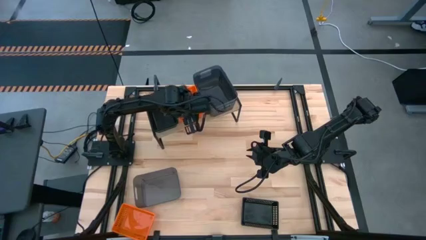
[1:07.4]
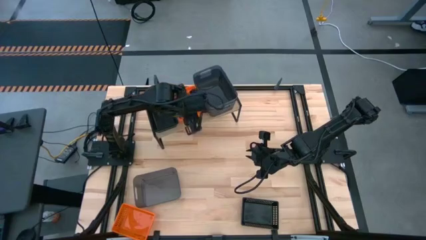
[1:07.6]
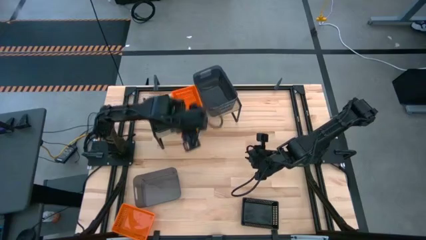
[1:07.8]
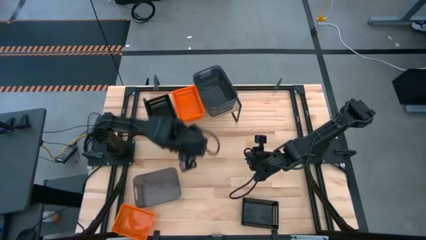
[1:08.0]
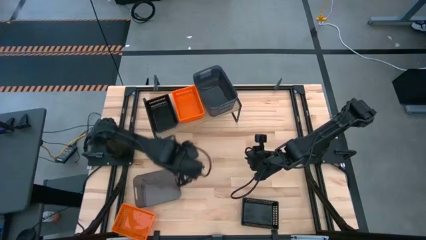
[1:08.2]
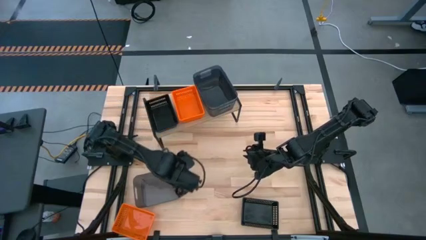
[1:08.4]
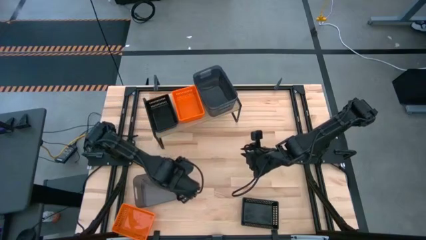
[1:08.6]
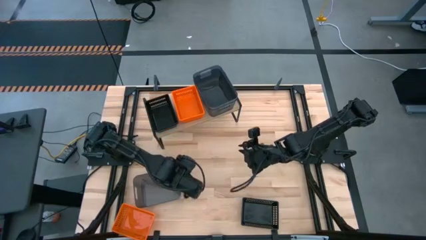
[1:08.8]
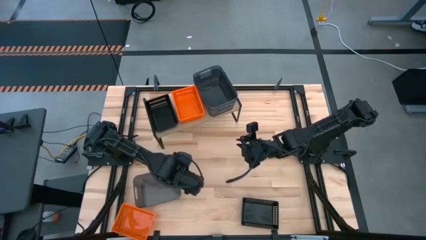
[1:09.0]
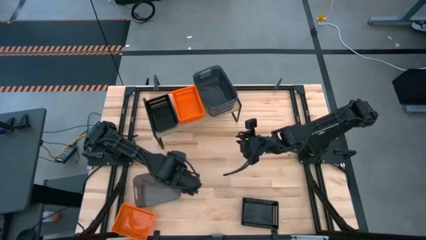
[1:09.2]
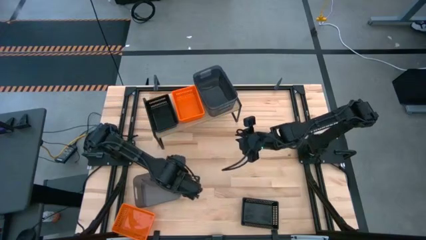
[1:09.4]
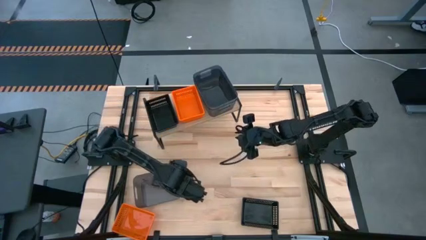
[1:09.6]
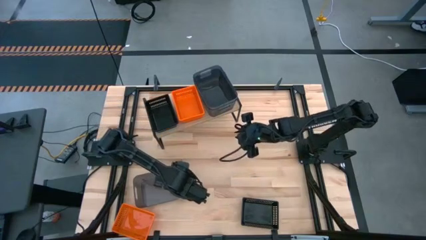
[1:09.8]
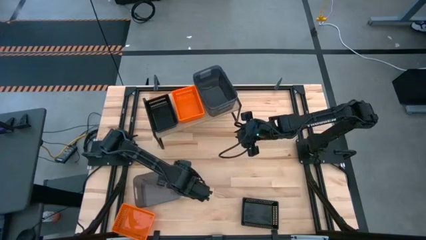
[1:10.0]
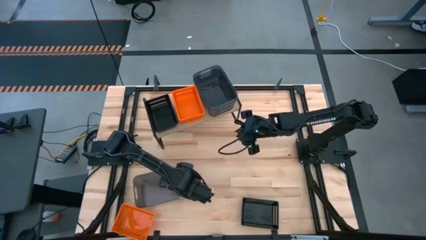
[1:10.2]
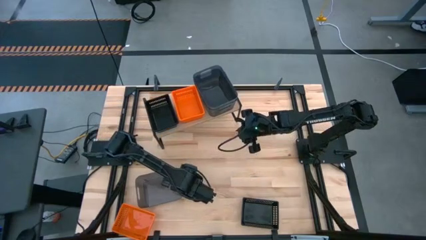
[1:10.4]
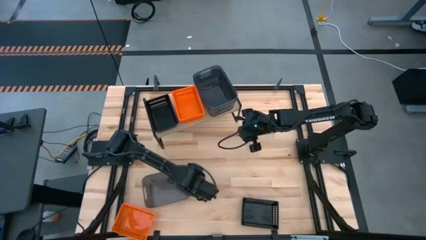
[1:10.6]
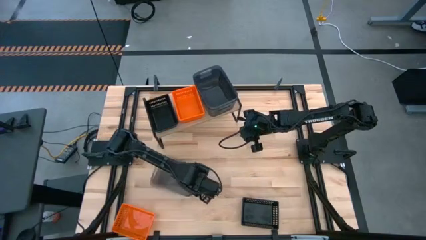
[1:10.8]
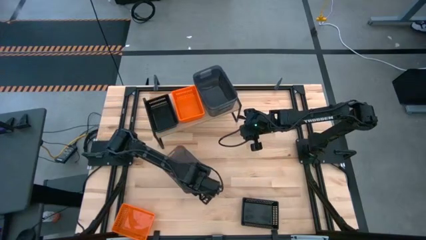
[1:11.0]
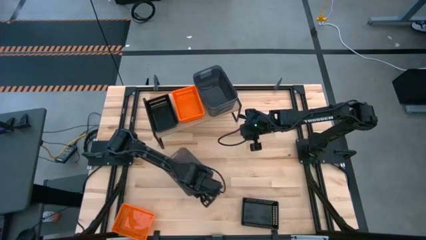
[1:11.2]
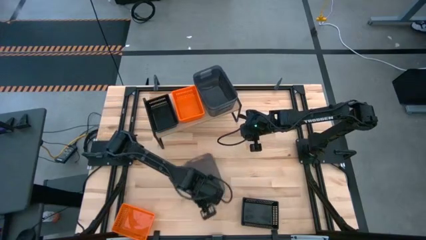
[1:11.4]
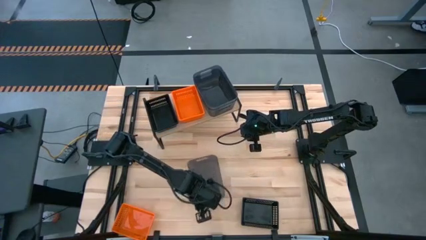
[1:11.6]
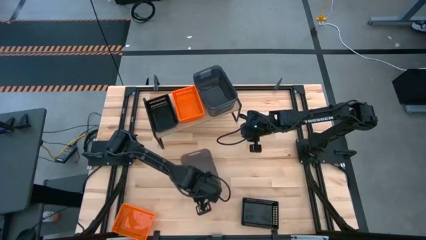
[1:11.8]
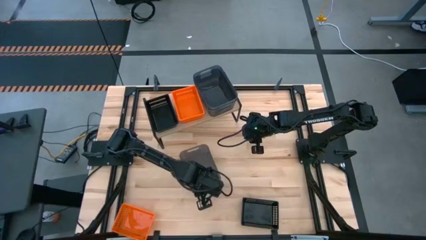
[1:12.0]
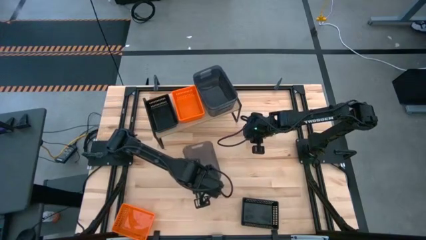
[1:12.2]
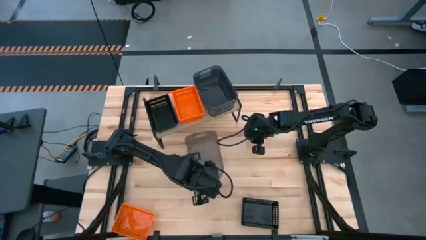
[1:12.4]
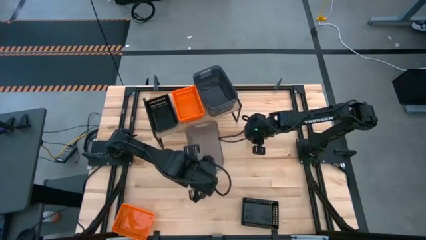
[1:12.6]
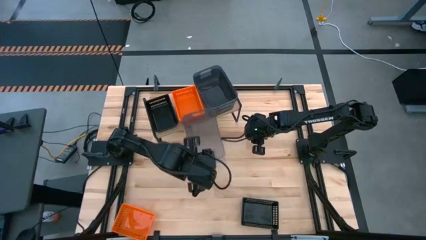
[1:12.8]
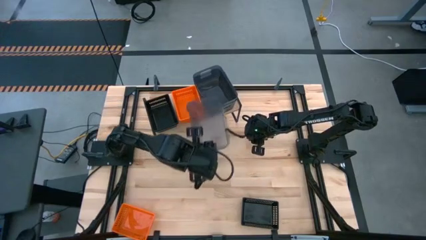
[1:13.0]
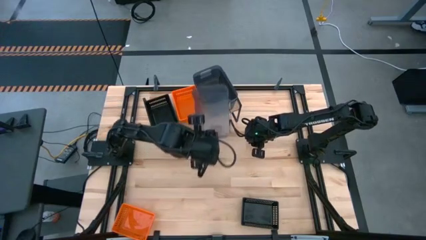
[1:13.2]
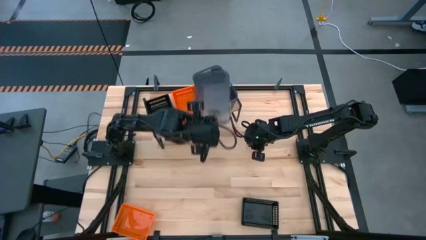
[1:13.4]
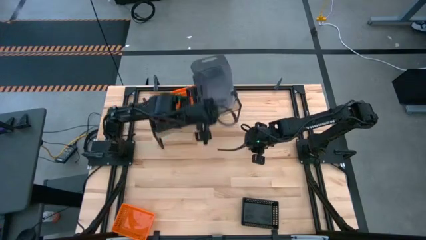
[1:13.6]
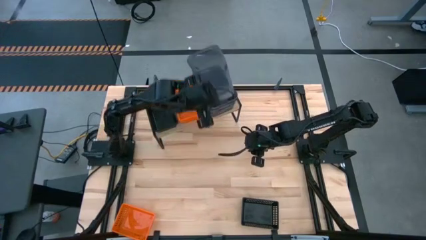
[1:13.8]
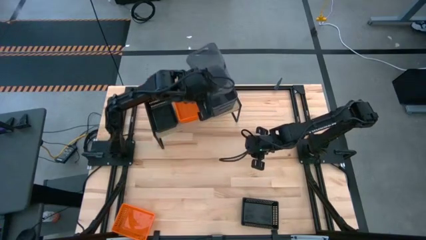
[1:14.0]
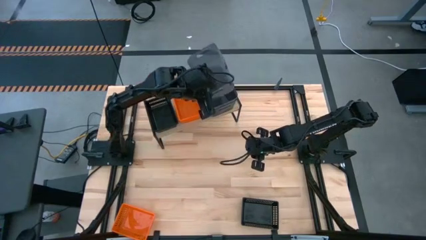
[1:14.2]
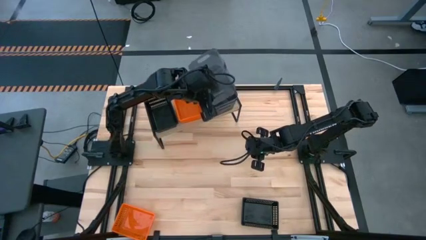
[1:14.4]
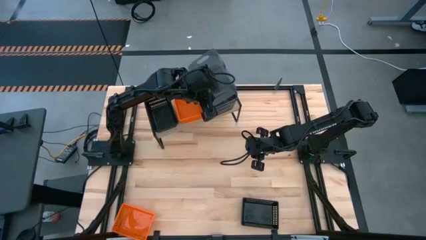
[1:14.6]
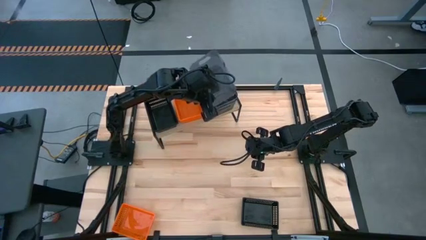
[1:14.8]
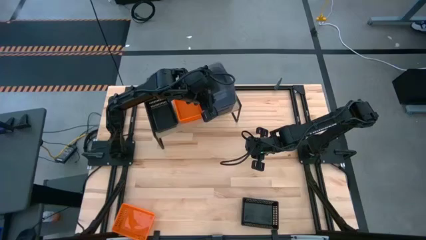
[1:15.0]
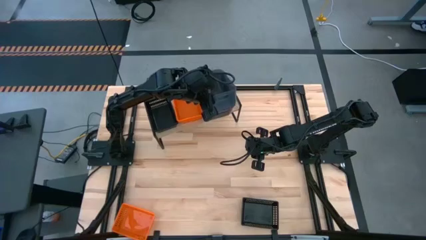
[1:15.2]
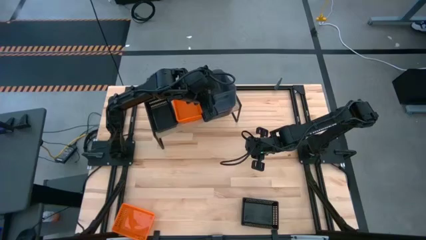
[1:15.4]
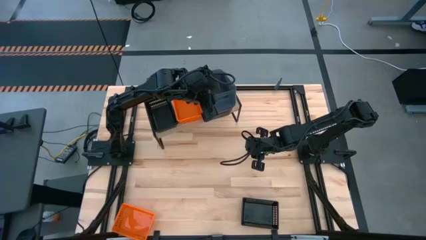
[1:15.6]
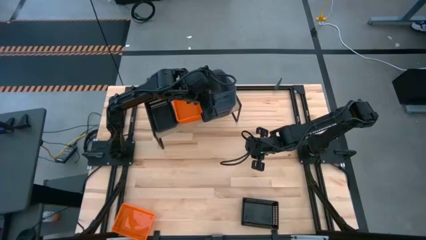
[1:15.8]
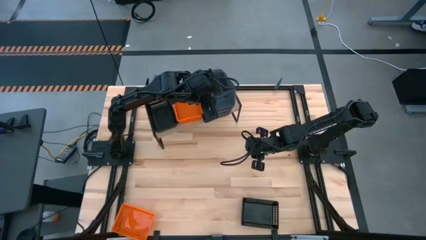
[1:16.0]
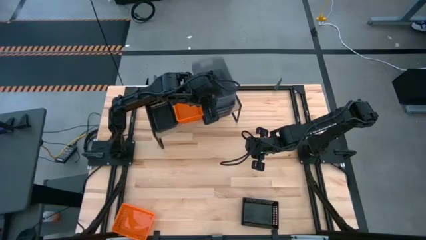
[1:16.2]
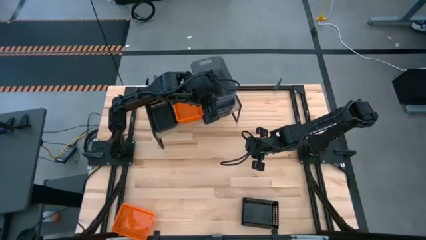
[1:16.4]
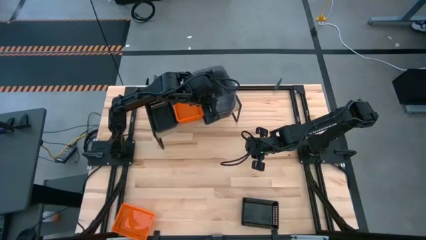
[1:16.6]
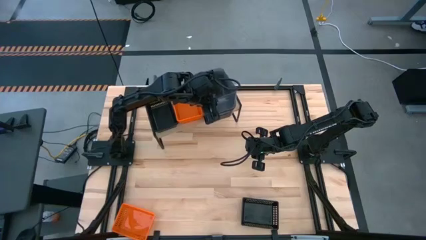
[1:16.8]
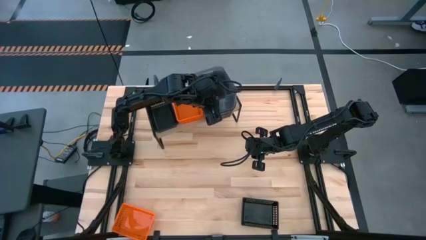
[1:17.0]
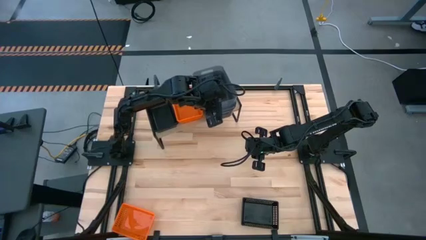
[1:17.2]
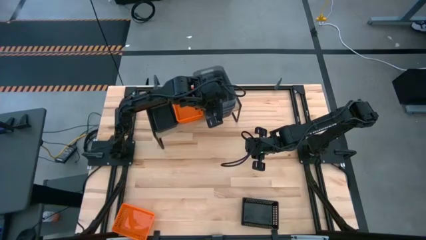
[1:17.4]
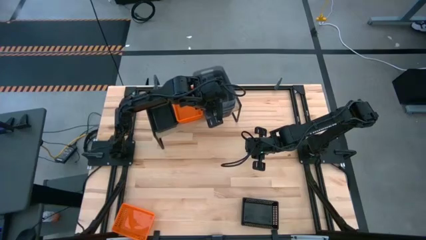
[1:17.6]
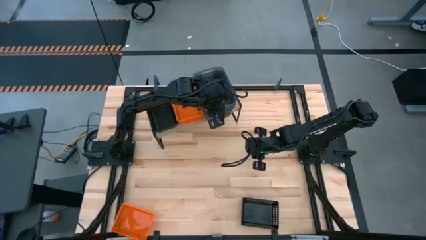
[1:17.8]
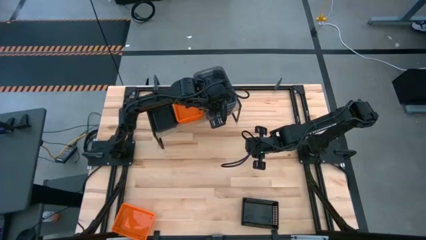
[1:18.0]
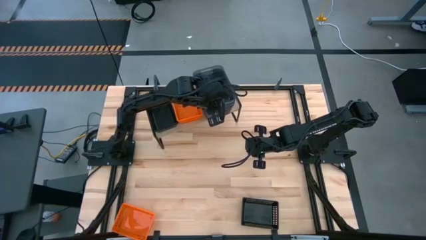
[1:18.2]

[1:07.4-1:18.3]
Task: Stack baskets on shelf by color
Stack the black bin on top of the other black bin on the shelf

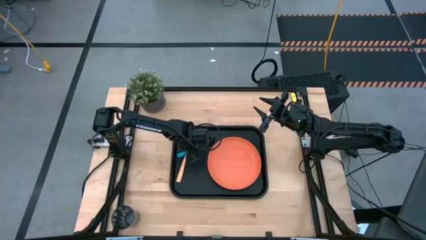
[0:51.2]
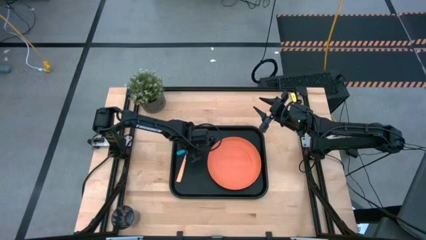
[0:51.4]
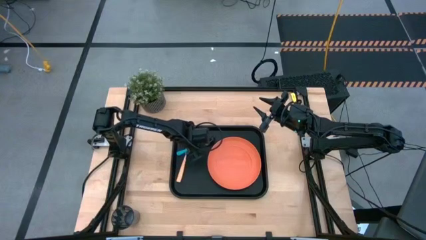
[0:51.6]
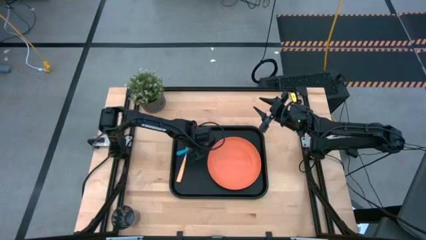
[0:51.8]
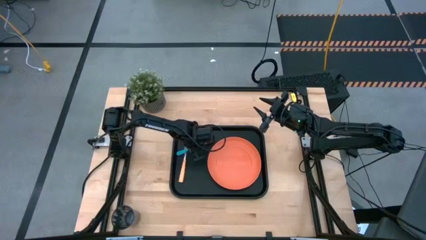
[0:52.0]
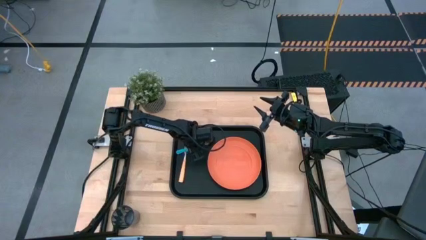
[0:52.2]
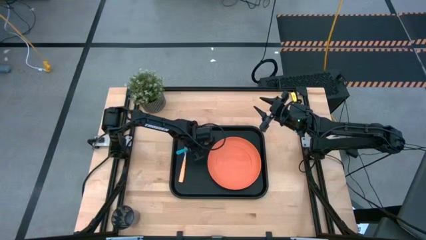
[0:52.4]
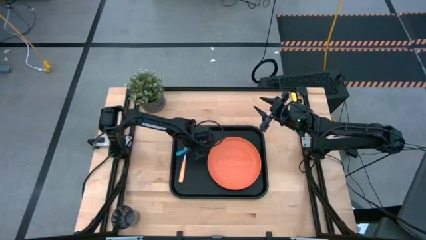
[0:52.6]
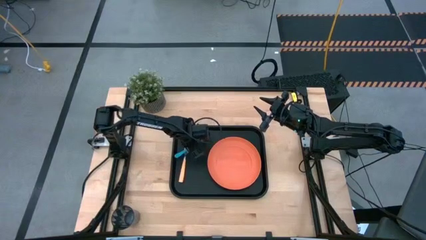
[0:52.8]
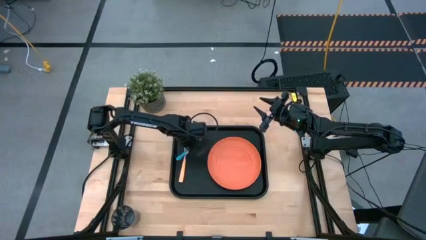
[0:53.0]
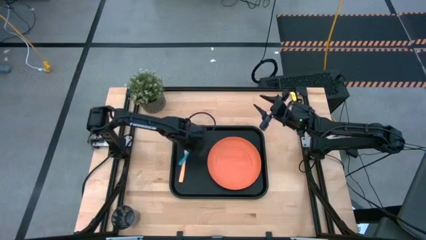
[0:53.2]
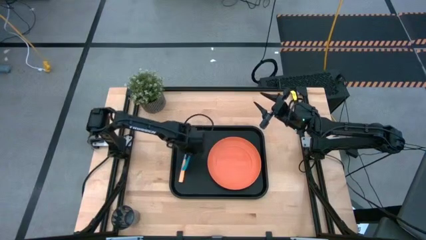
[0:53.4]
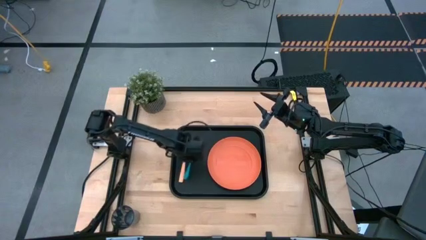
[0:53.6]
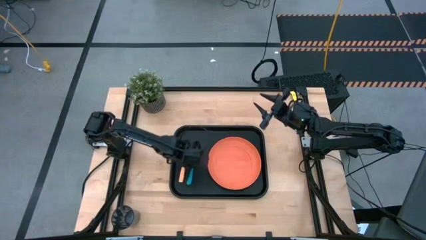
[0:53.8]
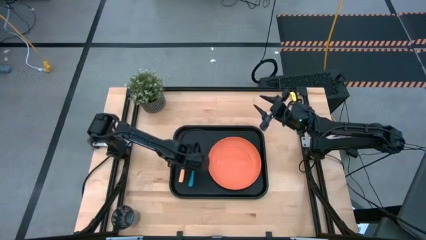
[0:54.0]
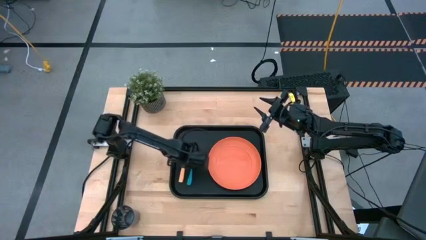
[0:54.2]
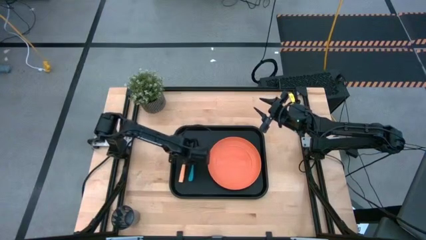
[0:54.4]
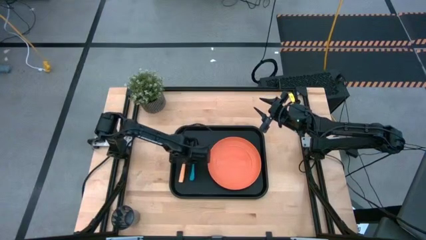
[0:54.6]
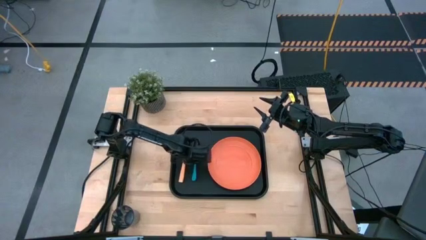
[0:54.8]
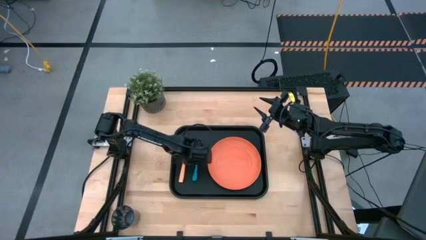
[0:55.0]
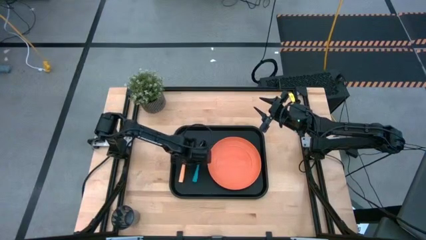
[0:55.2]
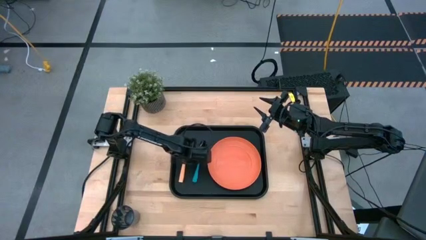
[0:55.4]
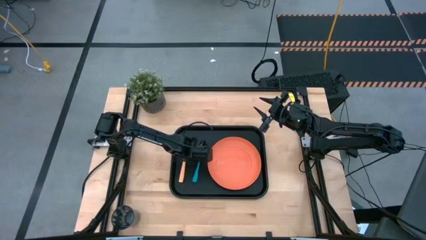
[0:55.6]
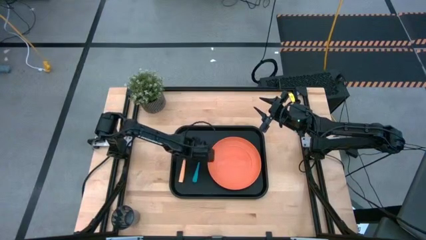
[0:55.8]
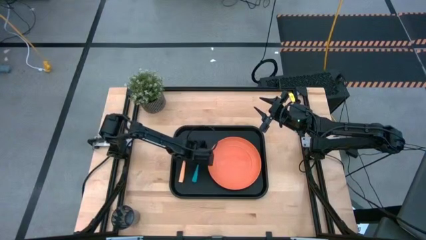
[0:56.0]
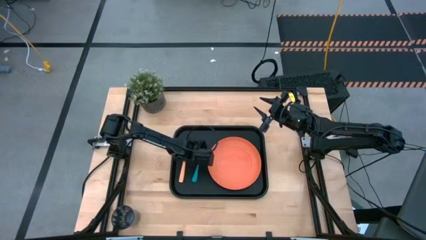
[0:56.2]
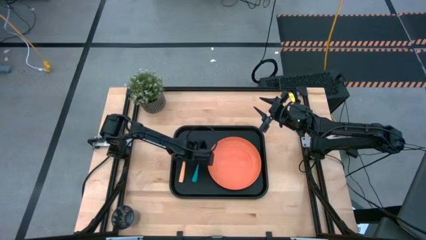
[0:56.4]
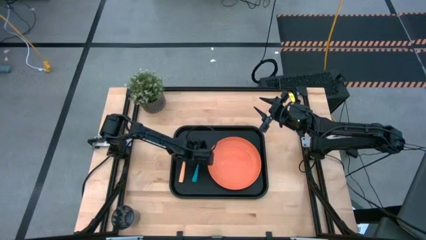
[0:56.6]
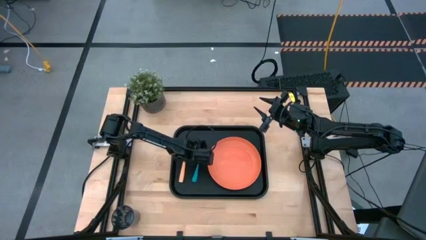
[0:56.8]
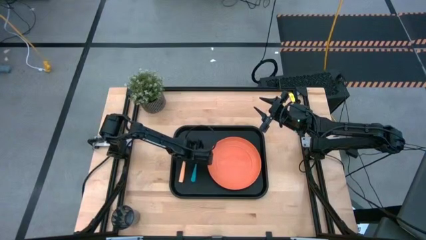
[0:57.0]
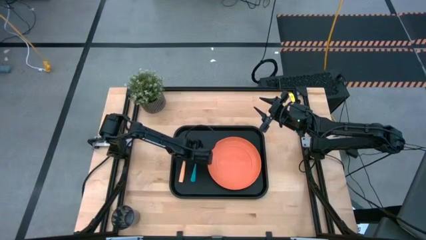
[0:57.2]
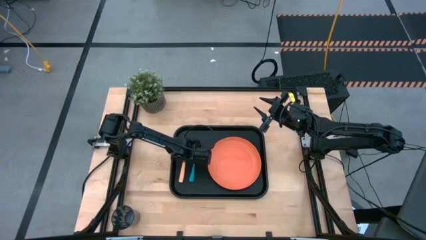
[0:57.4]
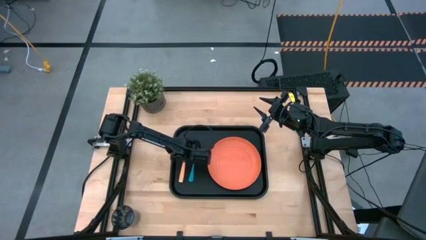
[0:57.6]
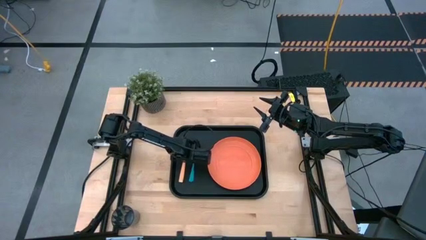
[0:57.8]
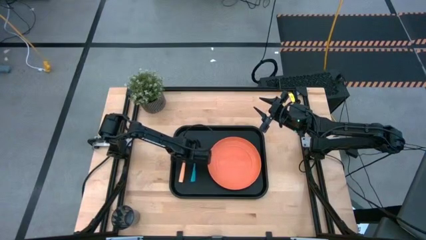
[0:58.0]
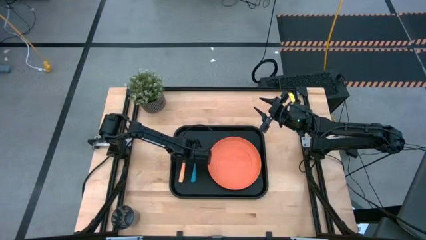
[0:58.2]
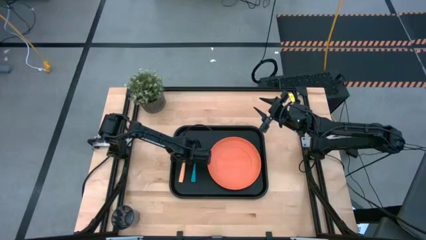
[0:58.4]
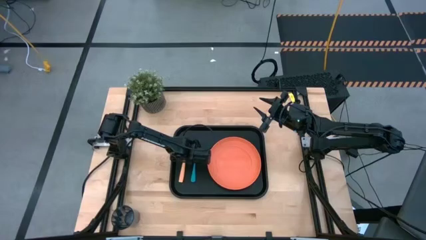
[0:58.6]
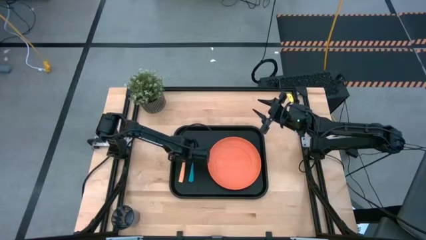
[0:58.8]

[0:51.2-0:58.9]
Task: Pick and place plate/cup/fork/spoon on tray
Adjust the blue spoon
